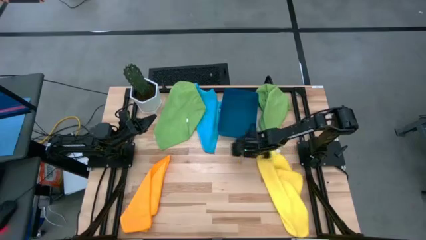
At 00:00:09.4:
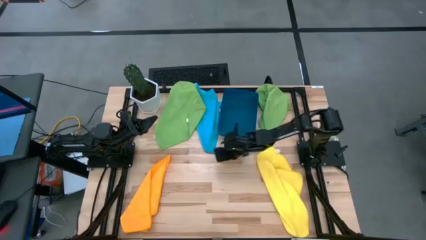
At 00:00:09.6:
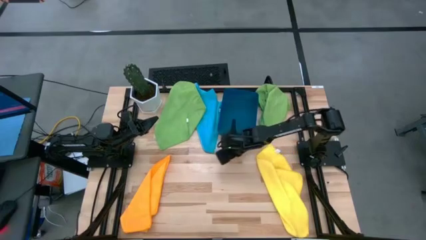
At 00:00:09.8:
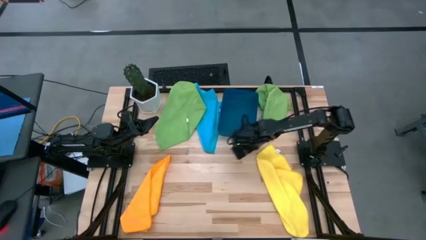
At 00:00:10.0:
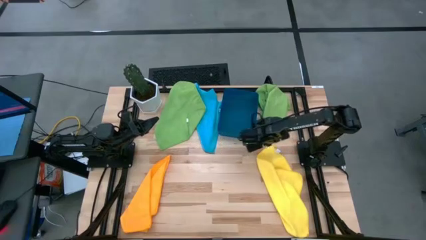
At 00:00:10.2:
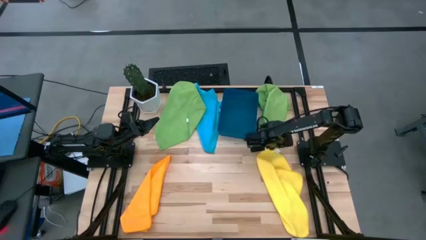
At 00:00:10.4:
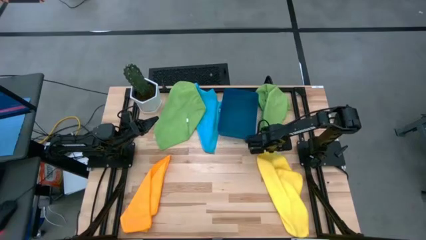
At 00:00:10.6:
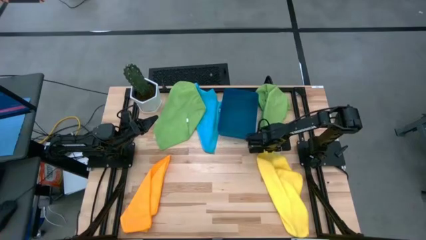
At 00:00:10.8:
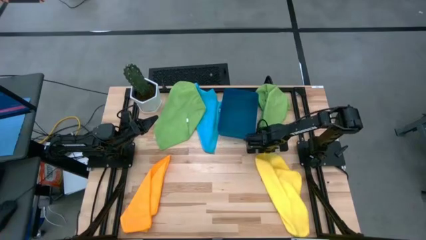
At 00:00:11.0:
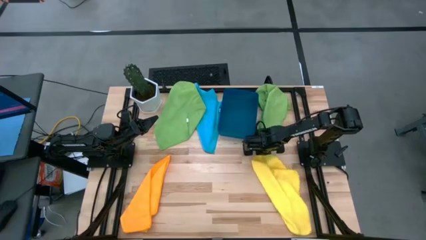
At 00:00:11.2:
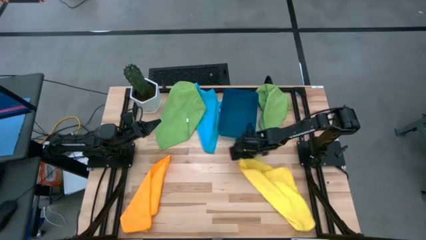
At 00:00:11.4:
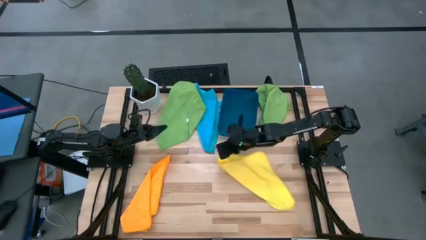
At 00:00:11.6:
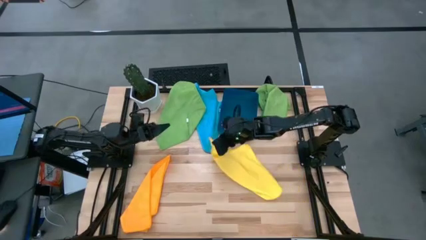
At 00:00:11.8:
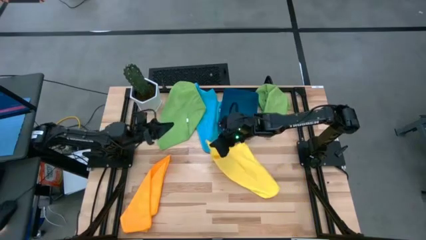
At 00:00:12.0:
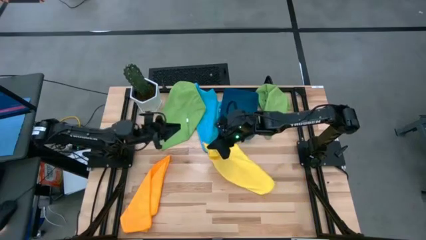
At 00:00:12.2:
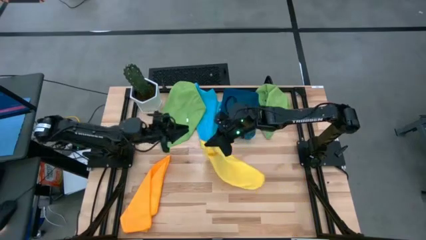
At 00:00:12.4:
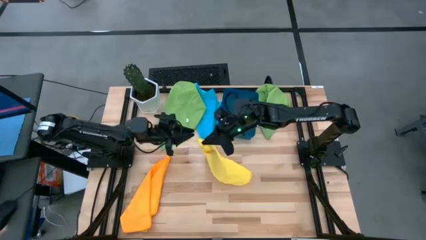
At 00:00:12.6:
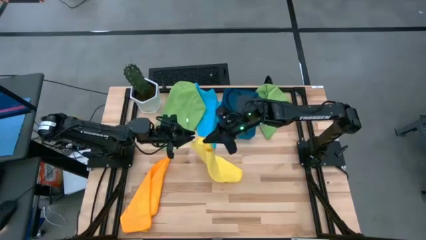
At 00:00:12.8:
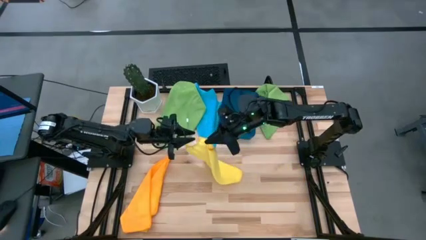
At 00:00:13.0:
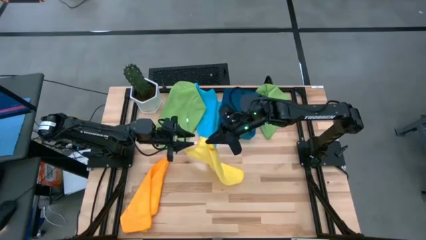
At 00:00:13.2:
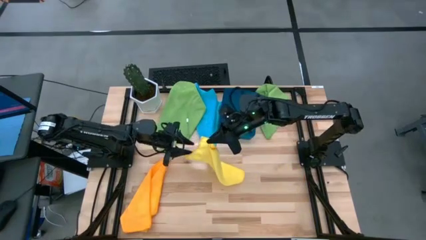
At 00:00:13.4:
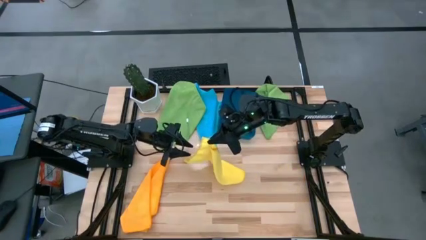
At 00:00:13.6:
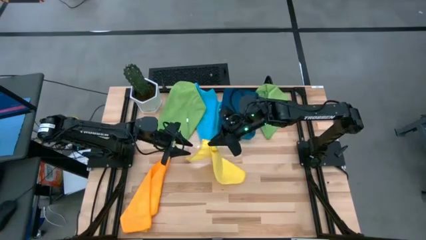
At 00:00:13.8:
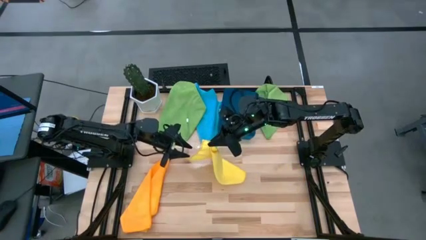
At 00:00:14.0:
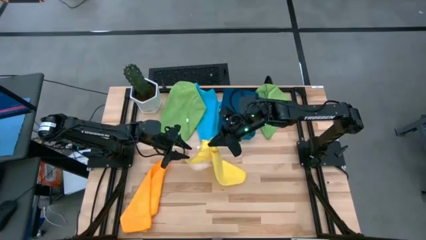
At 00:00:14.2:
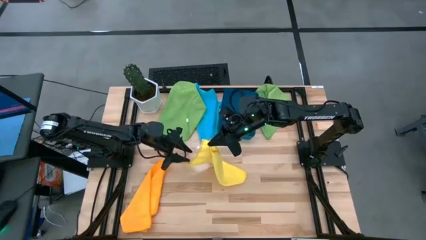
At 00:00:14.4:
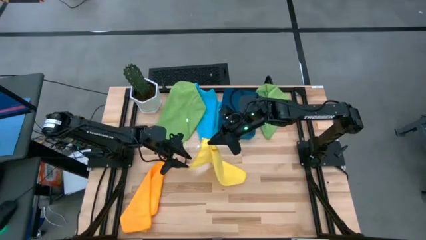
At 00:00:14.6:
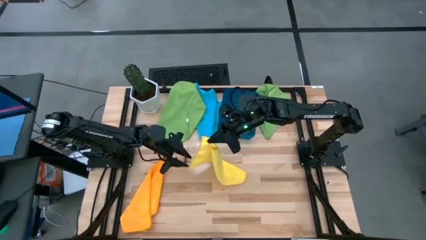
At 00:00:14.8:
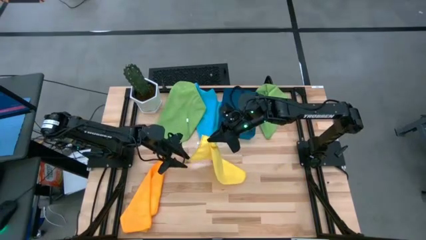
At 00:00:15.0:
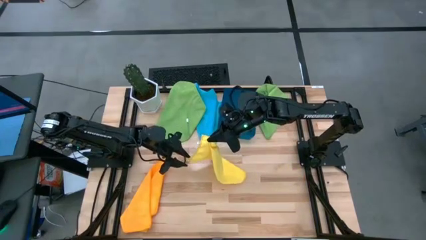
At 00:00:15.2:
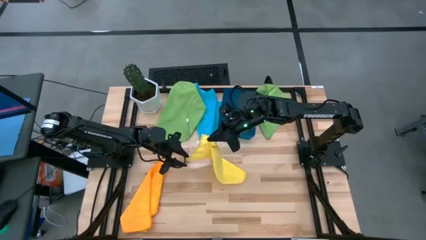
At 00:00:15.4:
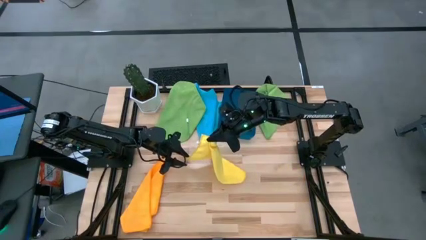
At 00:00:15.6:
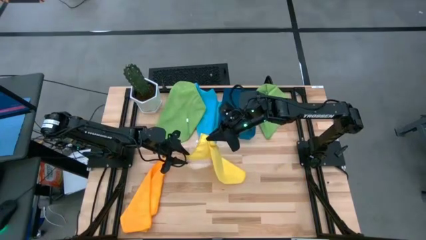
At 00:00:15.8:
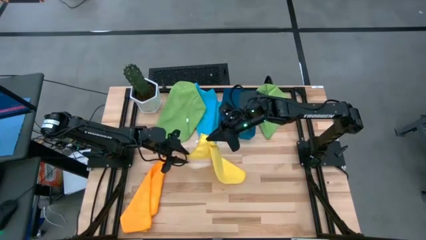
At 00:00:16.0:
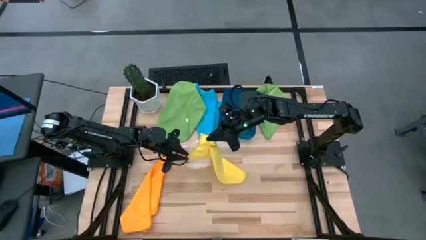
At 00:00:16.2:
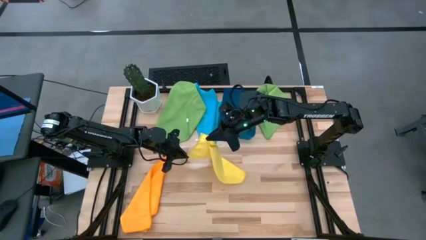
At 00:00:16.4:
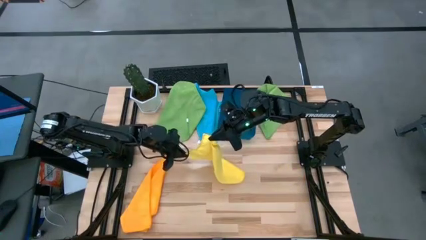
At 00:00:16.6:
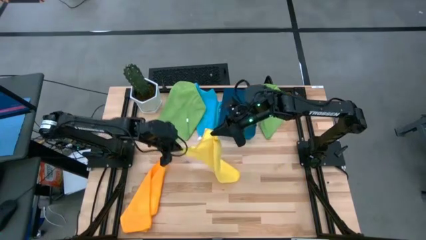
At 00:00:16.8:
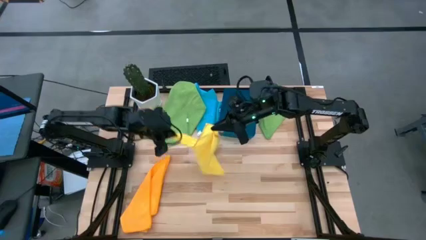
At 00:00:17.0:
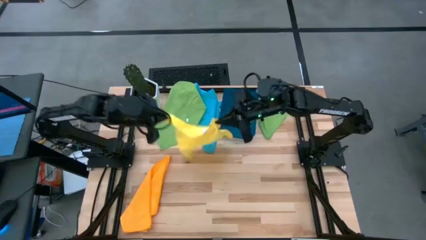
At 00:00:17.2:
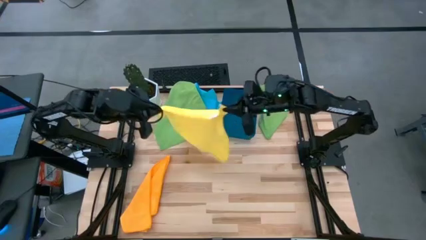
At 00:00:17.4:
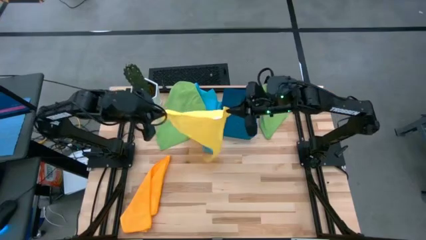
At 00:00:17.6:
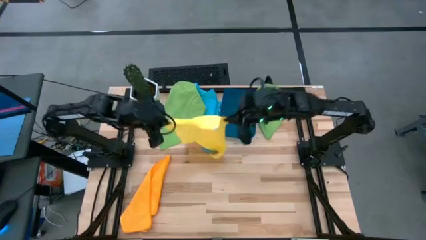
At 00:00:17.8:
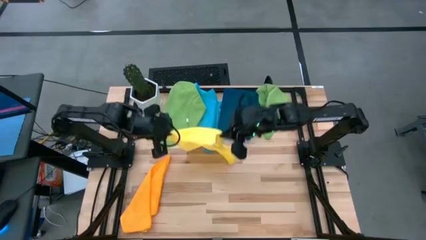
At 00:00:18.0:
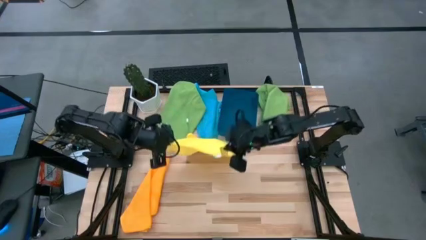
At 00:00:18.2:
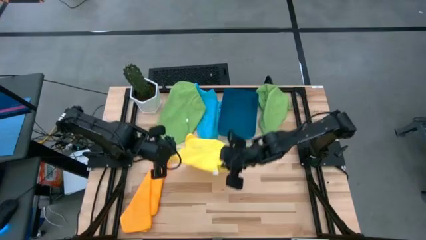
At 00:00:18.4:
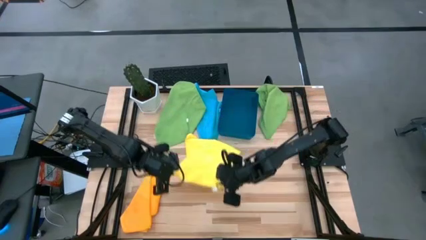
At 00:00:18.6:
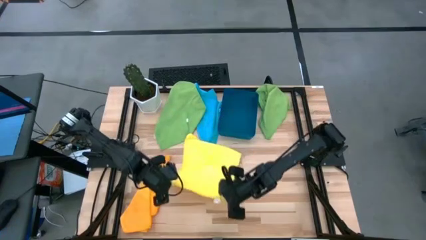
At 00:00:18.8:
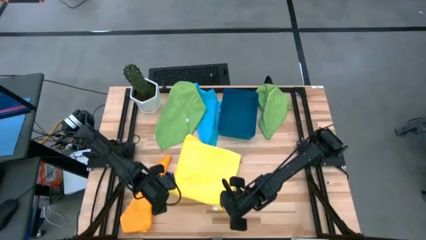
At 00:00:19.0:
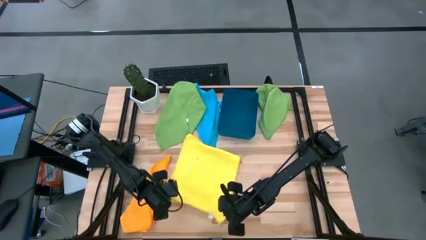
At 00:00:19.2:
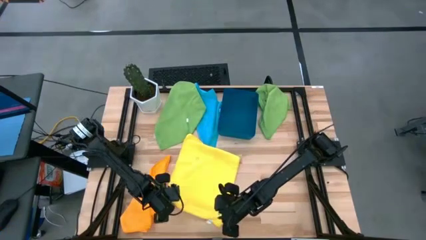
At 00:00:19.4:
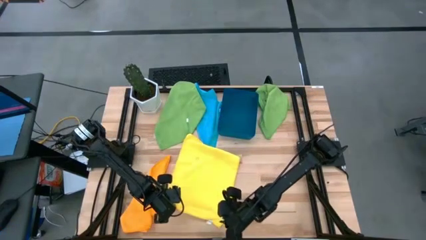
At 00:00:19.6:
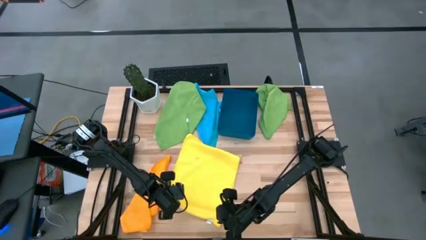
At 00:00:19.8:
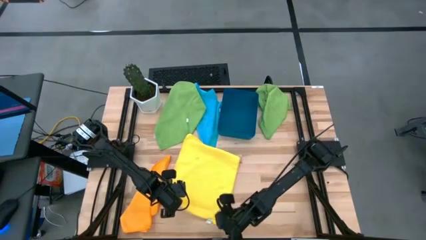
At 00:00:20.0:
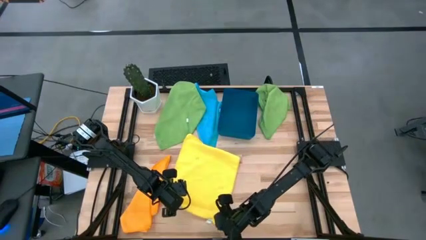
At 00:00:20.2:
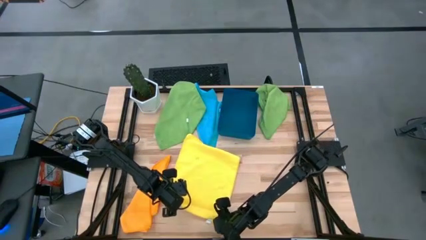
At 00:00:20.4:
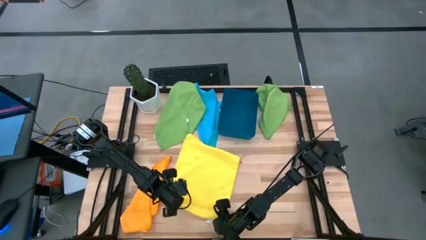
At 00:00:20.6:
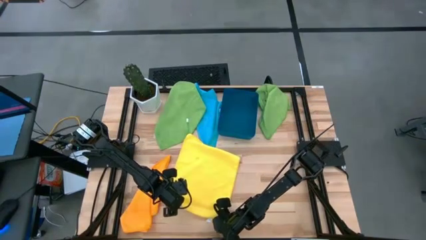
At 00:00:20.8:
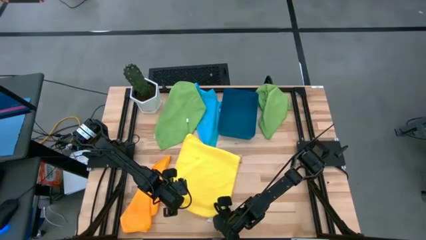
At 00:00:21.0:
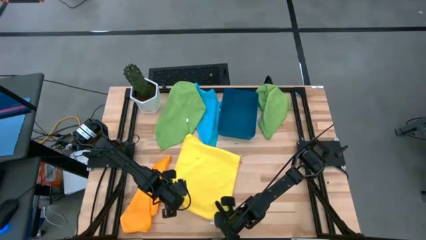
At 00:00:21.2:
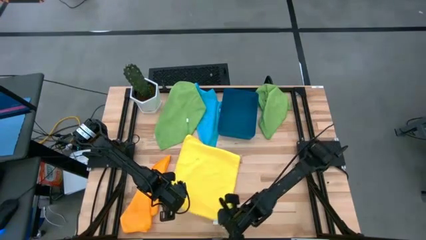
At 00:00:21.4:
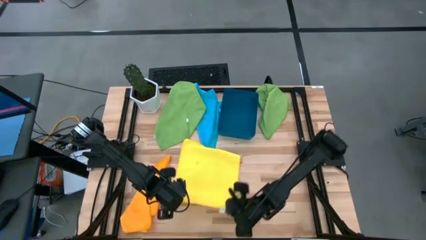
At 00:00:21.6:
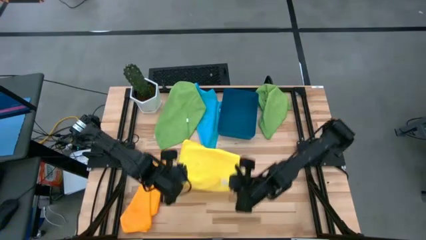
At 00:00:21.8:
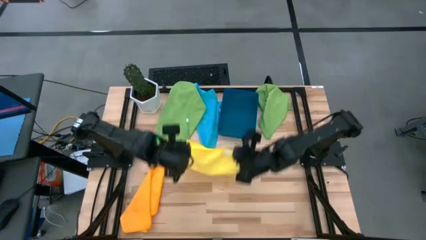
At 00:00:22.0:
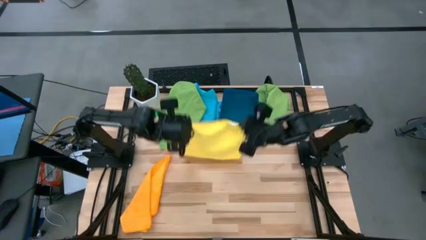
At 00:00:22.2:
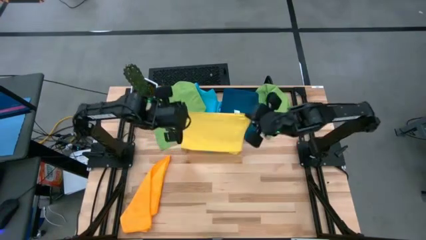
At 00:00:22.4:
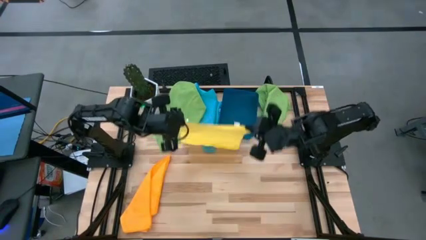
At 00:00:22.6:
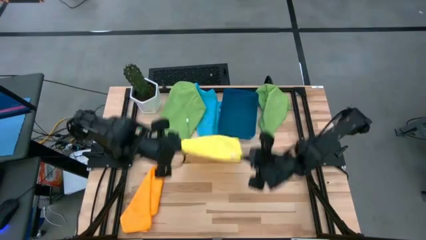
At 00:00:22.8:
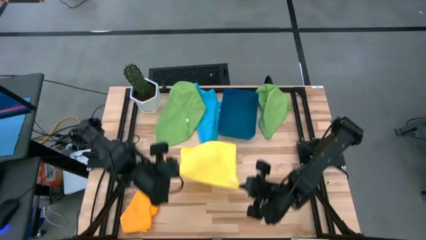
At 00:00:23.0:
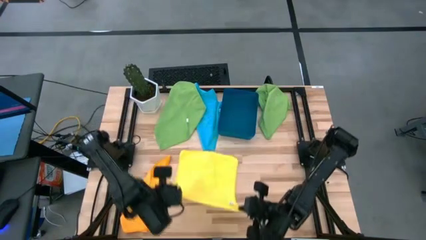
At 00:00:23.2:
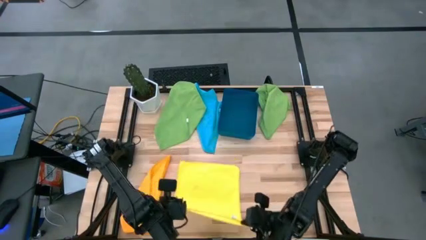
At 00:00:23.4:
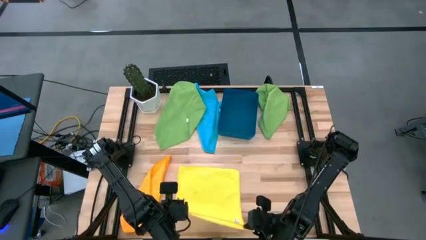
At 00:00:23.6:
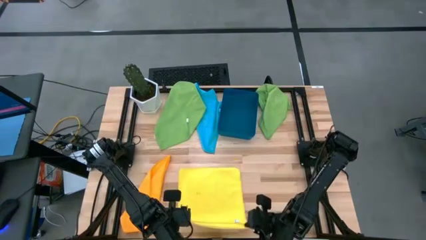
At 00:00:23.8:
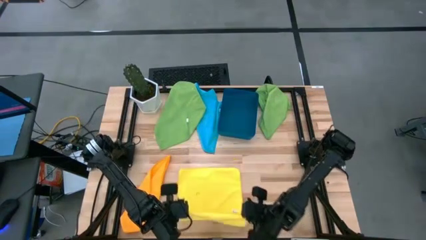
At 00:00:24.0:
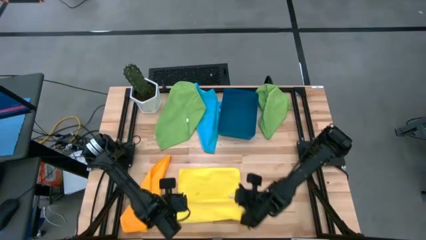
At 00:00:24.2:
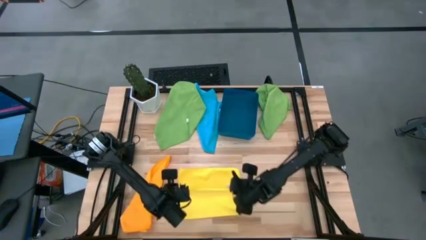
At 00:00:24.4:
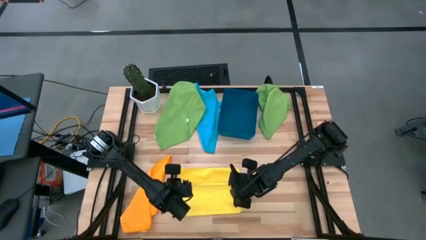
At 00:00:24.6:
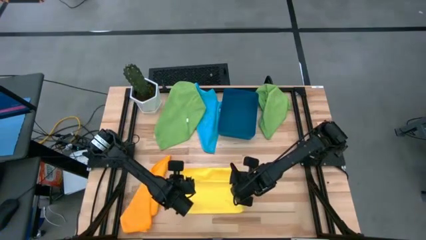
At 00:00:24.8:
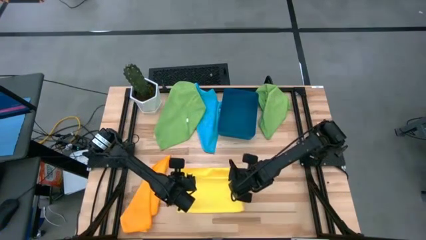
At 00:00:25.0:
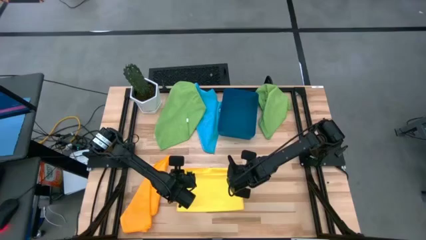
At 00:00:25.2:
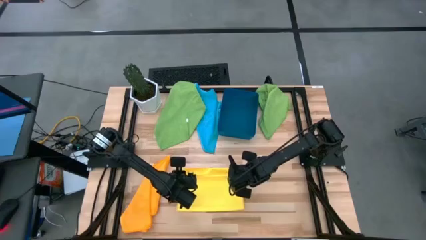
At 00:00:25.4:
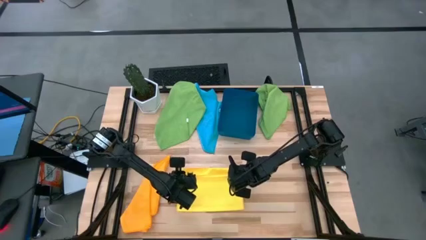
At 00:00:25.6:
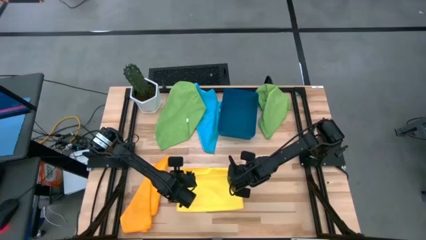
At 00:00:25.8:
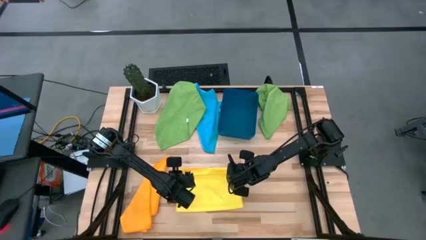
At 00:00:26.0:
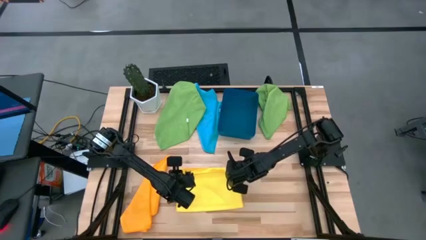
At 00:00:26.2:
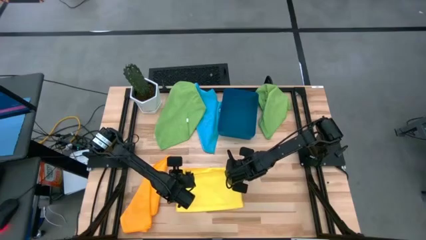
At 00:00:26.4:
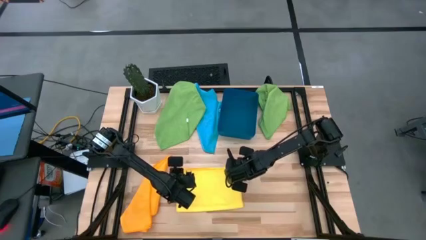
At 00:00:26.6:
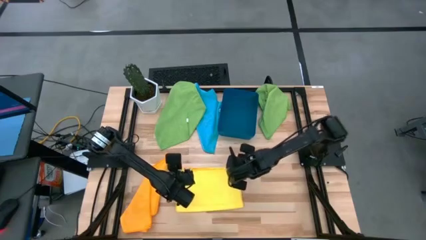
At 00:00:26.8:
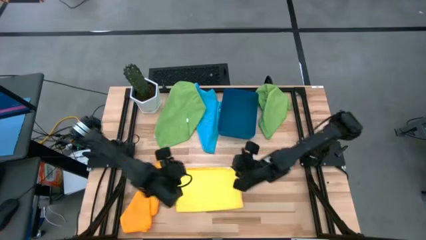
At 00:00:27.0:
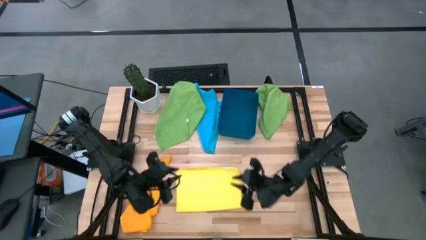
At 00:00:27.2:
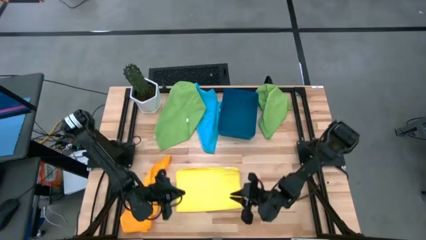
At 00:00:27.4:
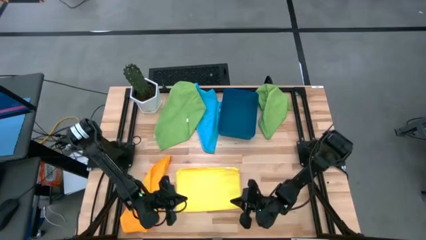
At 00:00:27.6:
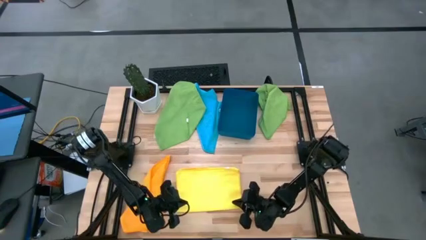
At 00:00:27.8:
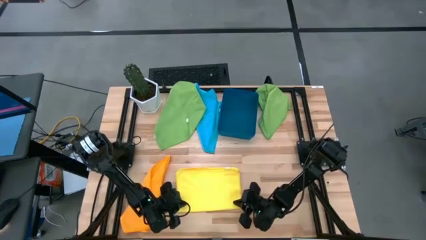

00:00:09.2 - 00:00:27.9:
Task: Fold microfiber towels
Fold the yellow towel
